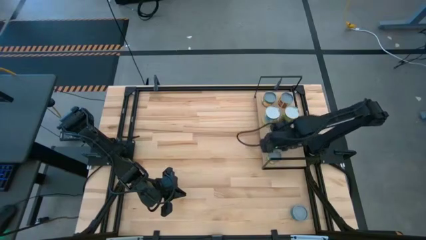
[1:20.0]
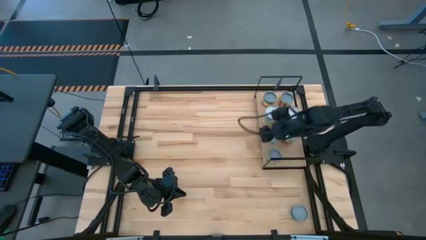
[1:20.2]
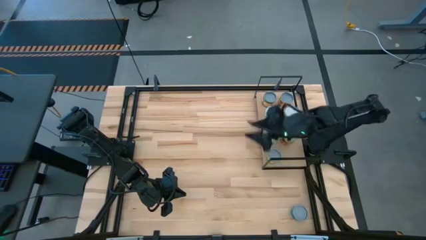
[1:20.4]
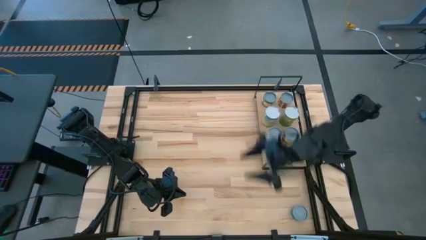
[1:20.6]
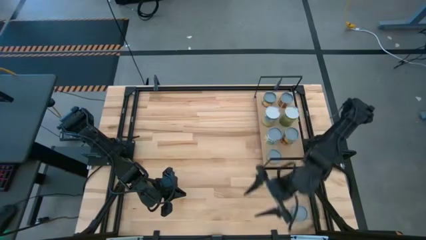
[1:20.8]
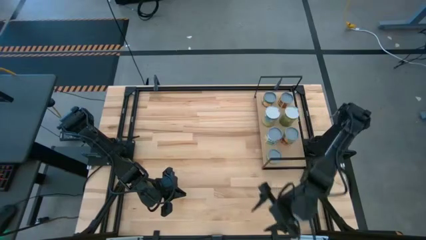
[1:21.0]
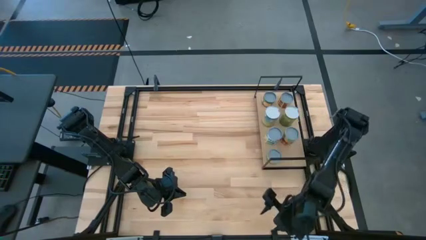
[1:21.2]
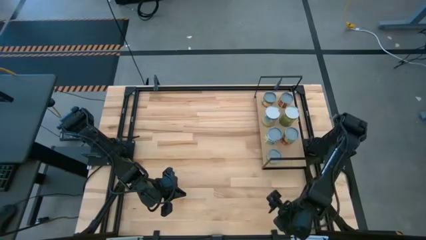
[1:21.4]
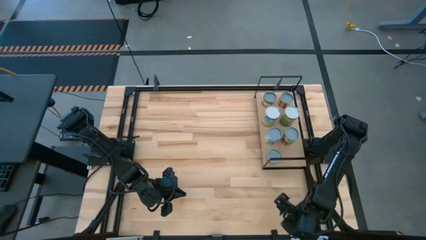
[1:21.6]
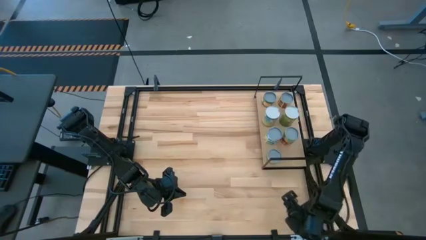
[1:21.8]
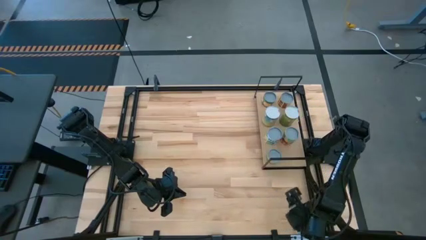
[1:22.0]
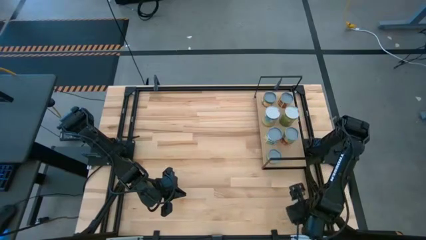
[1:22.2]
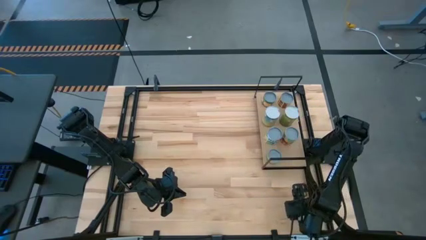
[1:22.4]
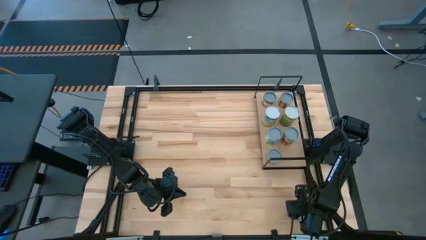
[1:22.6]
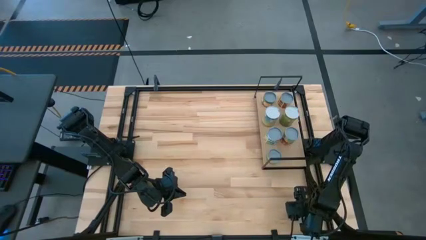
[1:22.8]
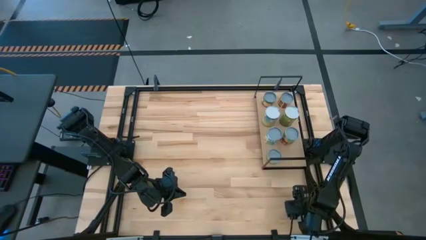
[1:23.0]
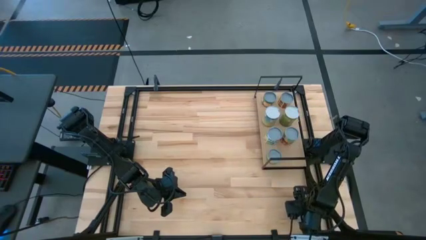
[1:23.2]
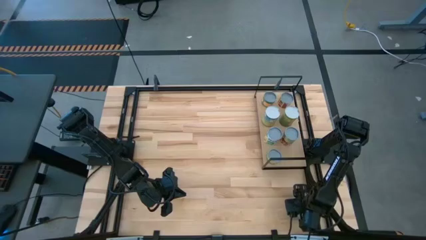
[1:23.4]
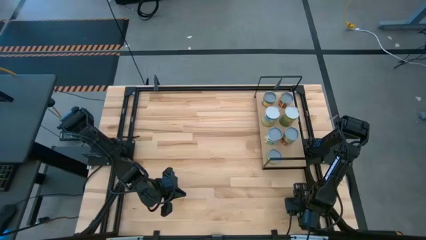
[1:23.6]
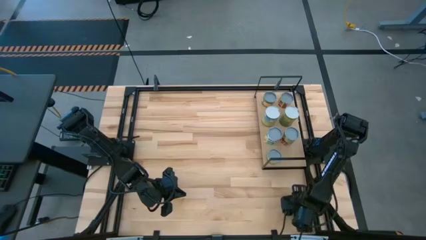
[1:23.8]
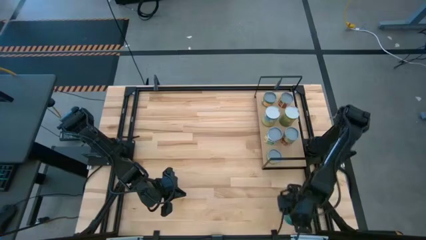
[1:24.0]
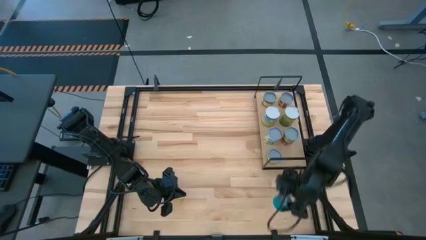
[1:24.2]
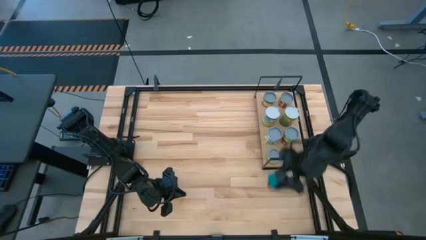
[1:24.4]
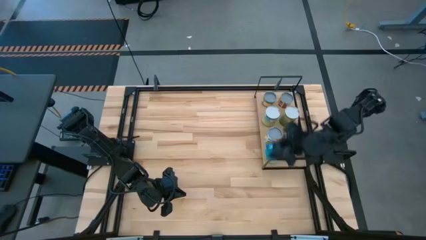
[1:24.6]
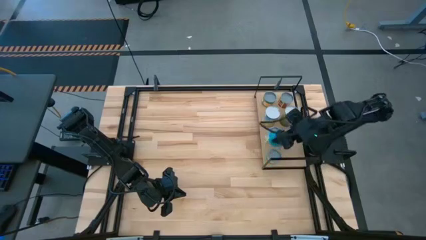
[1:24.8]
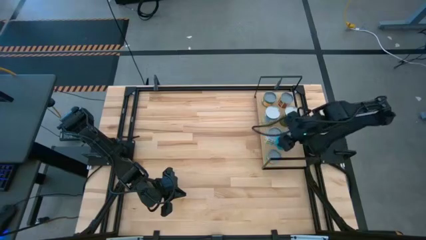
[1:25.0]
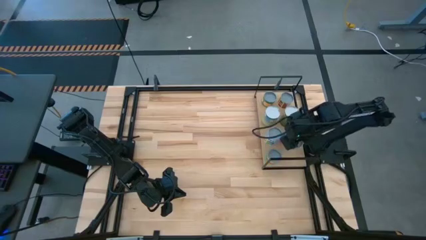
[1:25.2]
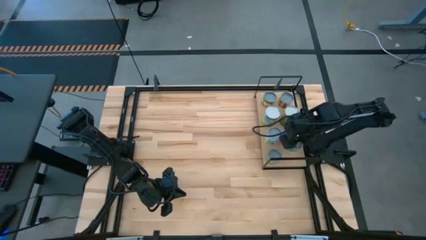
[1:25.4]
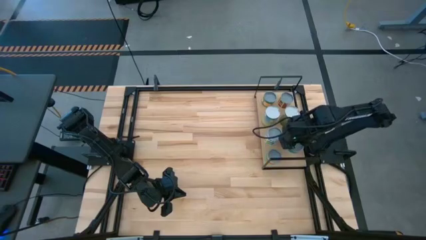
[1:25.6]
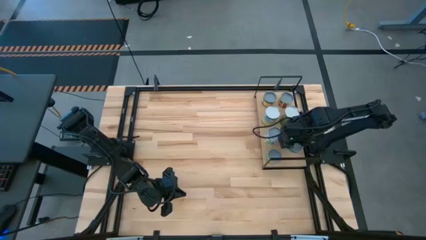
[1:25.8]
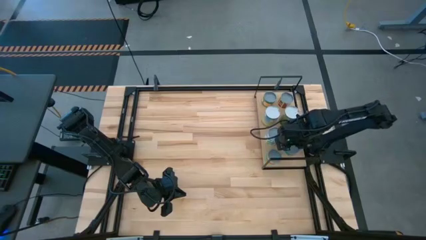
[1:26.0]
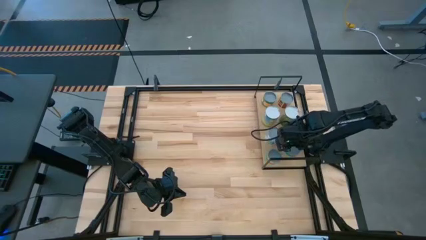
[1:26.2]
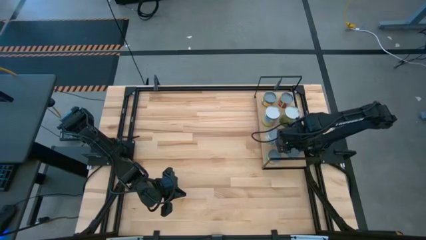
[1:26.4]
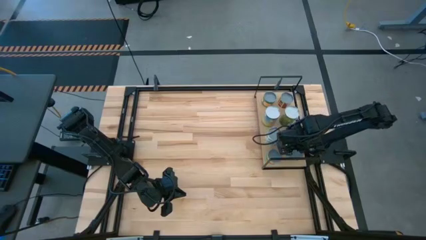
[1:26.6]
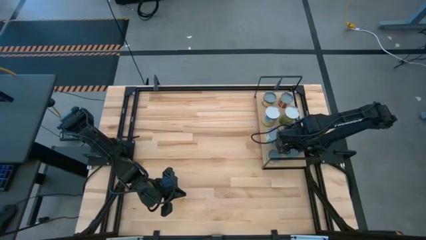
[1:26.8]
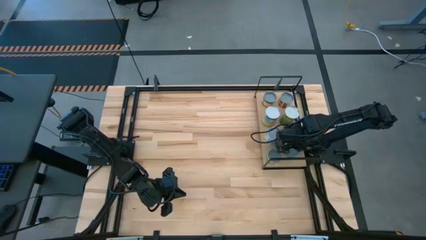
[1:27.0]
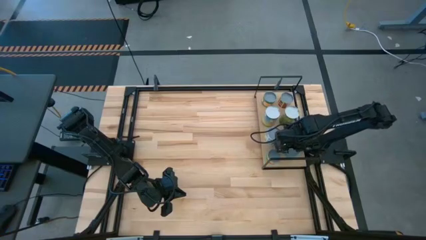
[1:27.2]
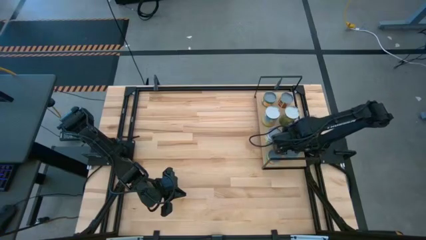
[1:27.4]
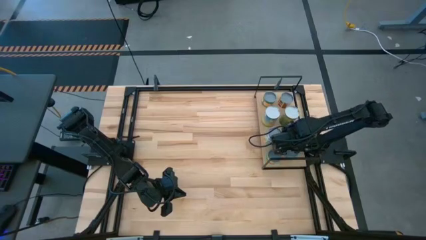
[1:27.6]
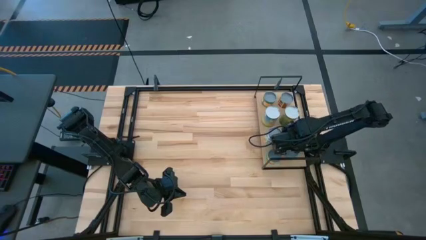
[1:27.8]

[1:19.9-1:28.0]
Task: Pick and place cans onto a shelf
Put the canned tuna fish on the shelf

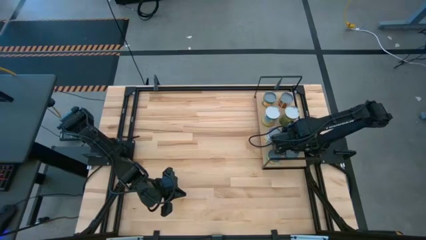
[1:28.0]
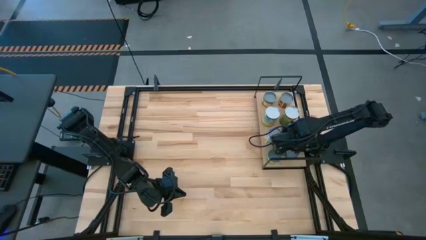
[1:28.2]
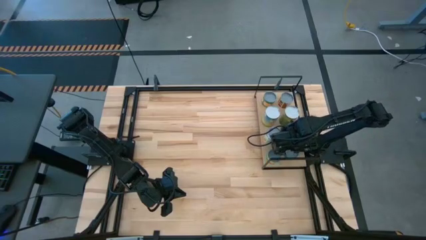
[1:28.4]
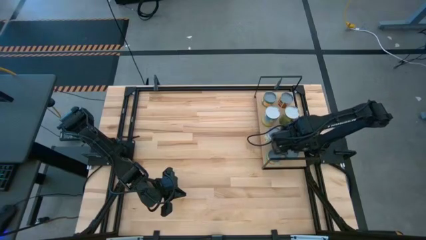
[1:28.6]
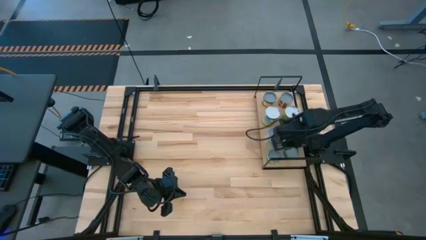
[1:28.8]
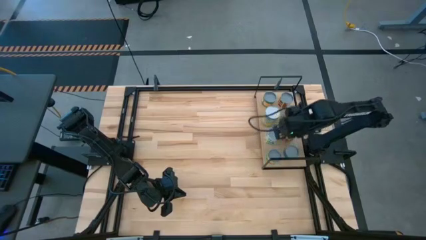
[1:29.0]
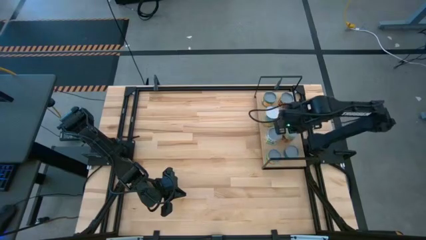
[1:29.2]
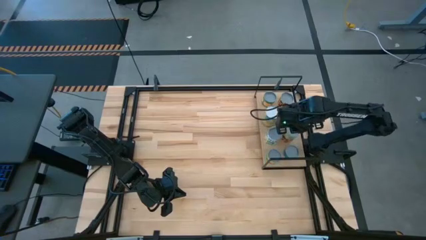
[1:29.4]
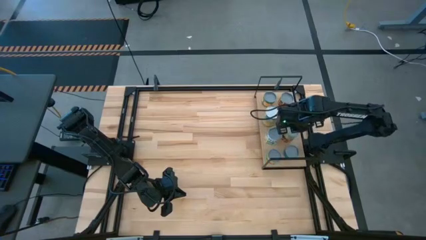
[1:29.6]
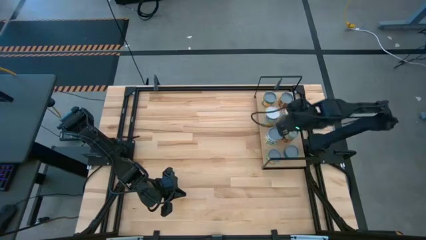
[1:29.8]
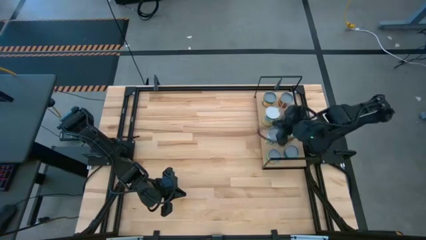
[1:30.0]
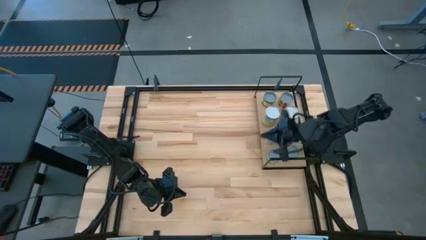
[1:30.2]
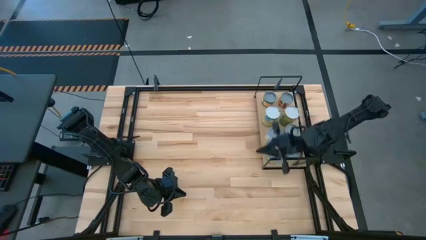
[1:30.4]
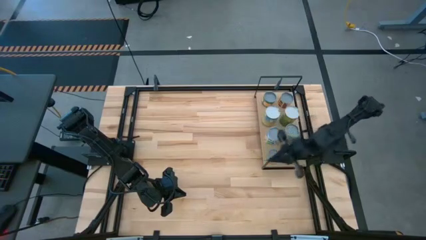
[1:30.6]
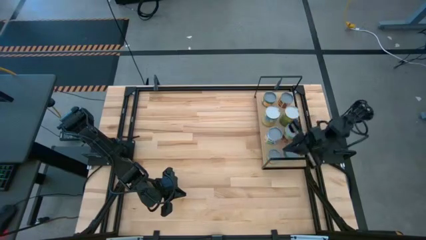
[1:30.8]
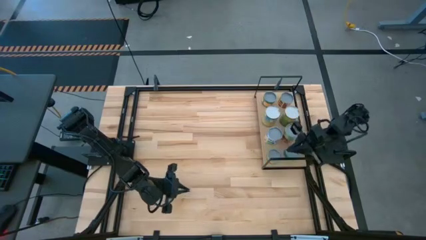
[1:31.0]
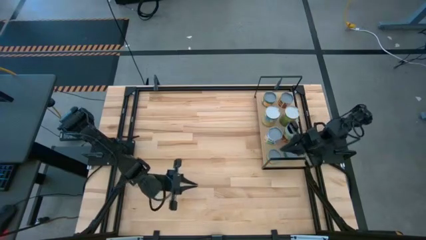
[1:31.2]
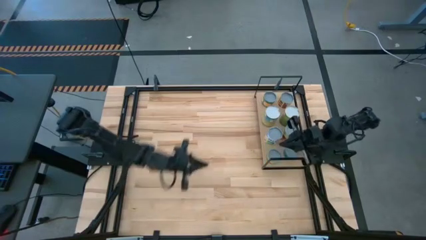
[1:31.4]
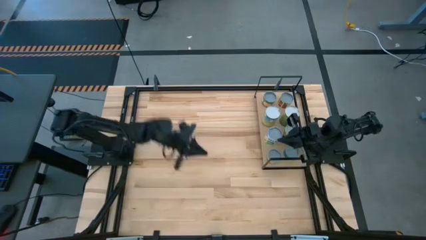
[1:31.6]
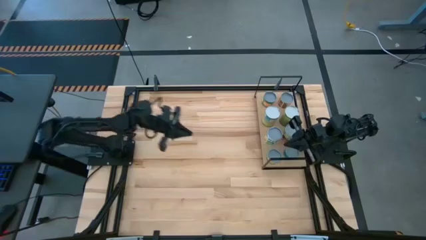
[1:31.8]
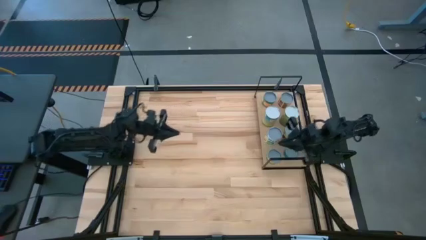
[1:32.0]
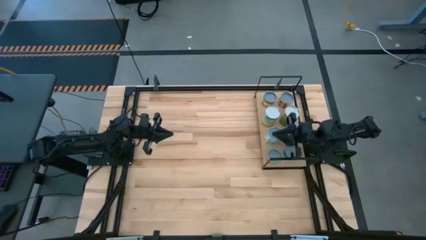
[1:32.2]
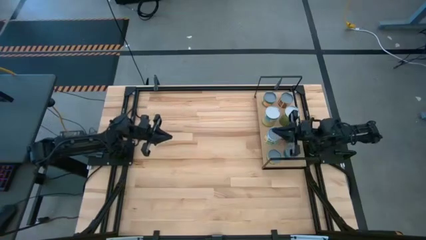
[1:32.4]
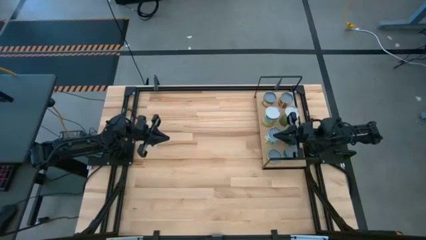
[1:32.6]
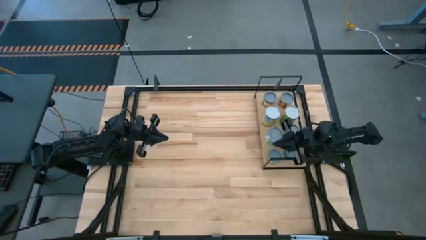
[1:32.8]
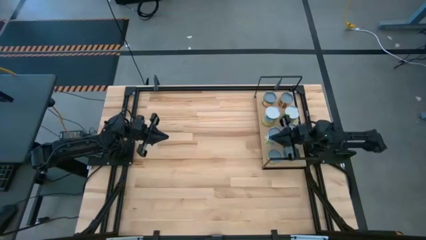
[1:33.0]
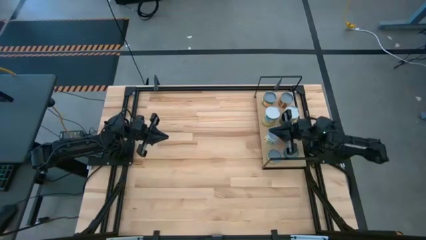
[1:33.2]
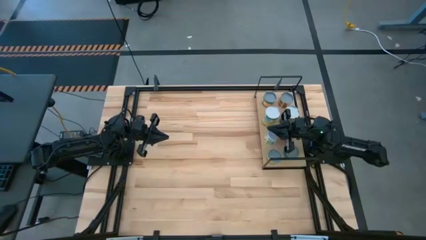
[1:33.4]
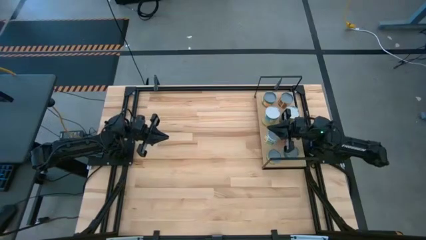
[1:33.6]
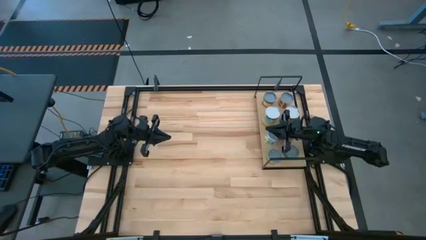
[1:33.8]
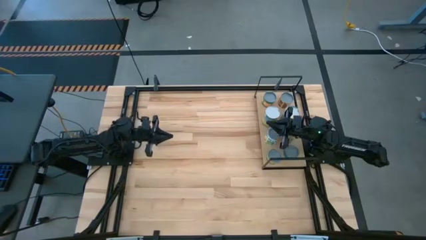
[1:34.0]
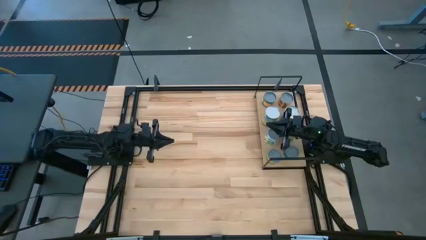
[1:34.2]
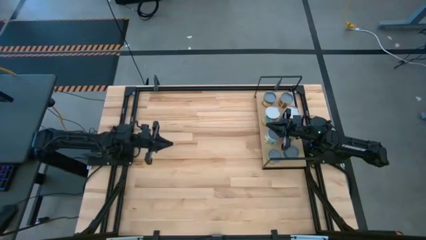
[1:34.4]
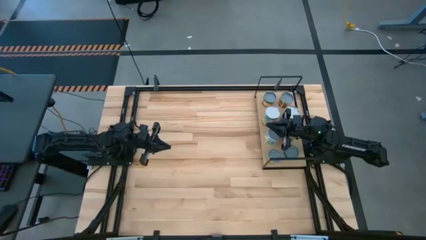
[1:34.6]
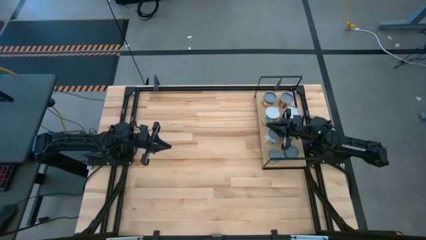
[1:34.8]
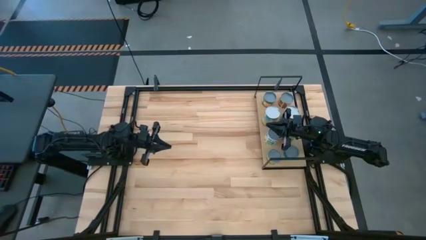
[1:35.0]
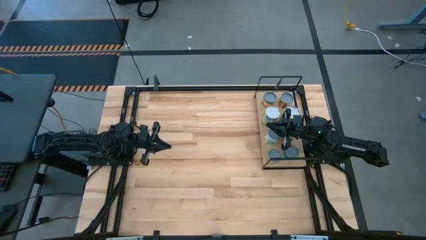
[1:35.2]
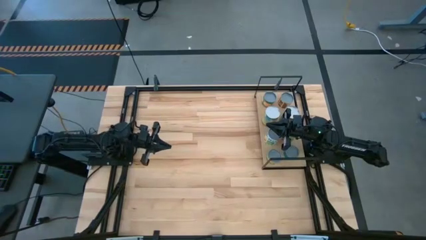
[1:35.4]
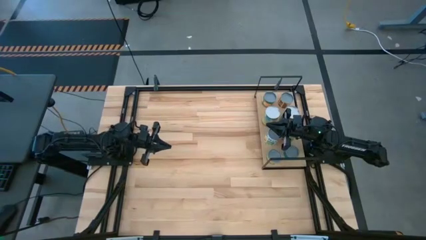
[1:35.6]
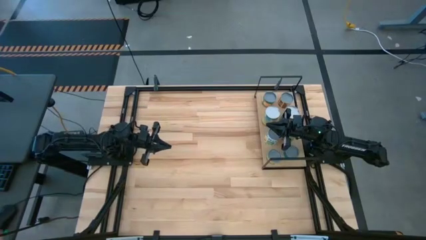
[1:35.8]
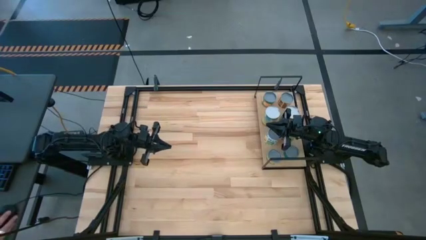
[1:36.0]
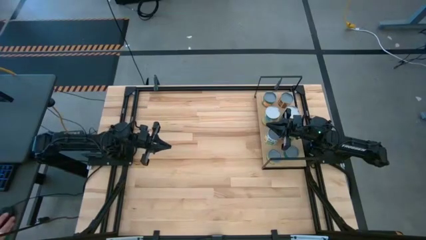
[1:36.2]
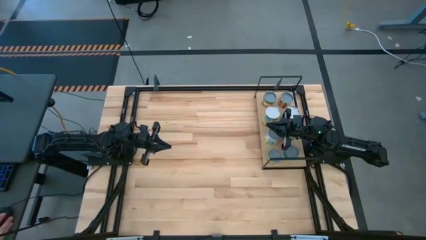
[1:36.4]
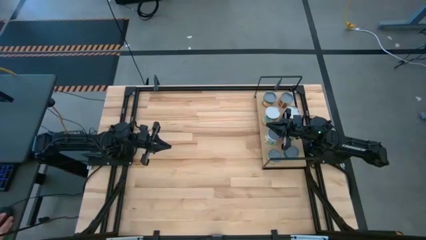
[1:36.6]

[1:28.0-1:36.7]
Return to Home Position
